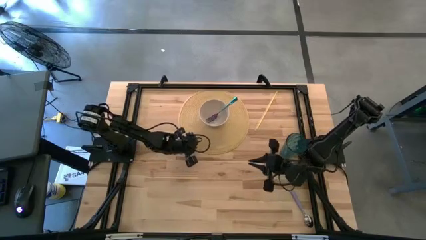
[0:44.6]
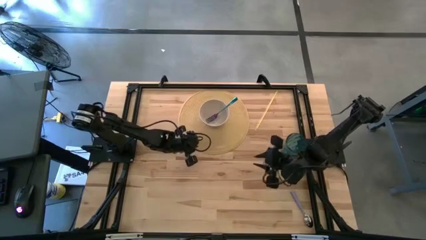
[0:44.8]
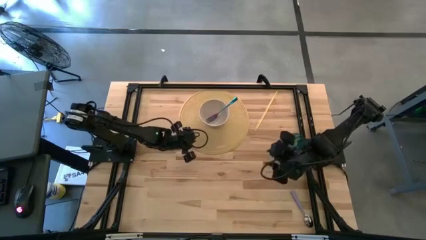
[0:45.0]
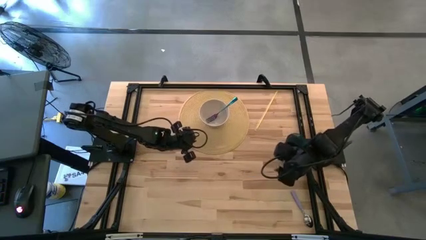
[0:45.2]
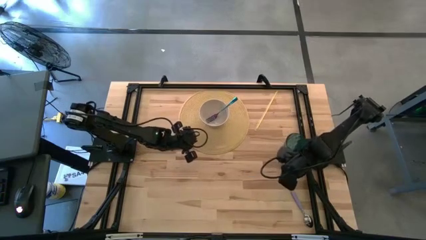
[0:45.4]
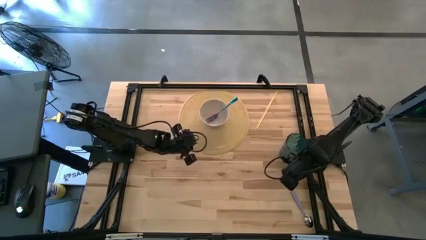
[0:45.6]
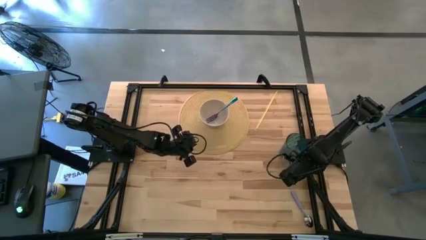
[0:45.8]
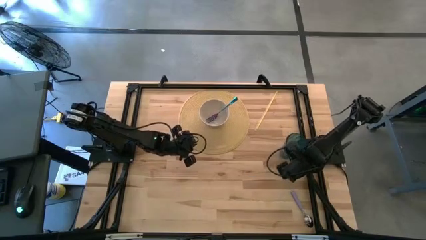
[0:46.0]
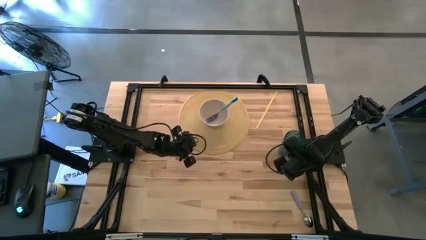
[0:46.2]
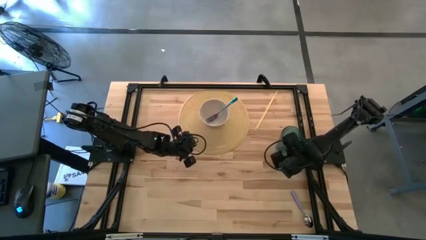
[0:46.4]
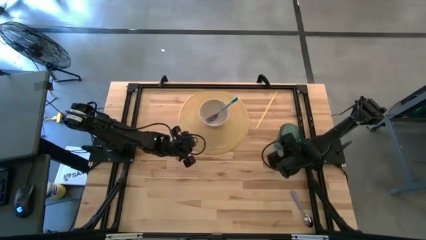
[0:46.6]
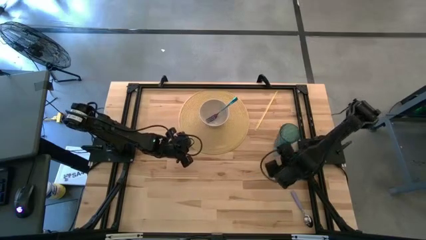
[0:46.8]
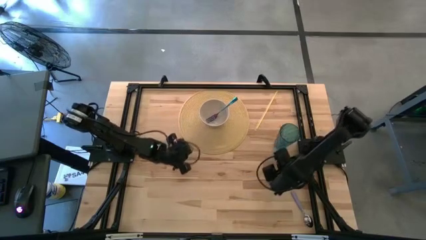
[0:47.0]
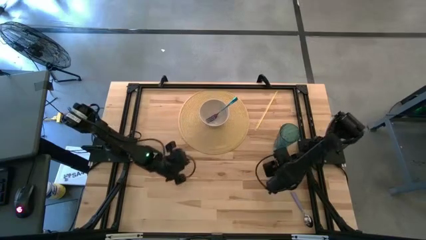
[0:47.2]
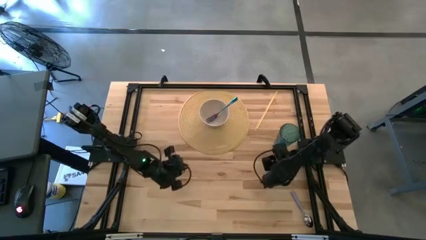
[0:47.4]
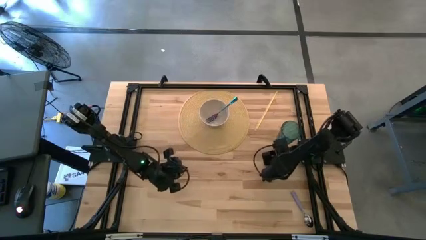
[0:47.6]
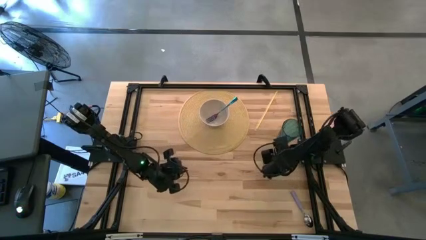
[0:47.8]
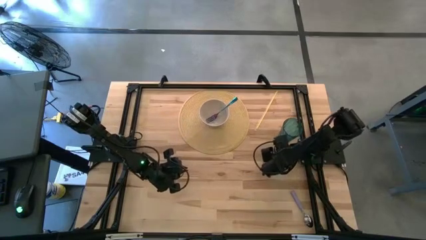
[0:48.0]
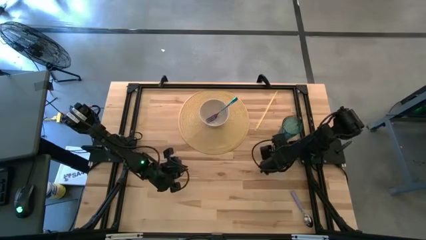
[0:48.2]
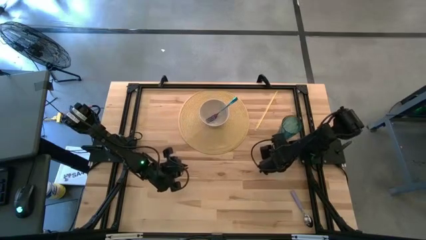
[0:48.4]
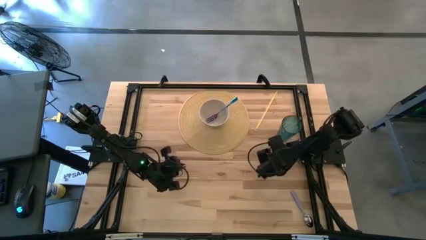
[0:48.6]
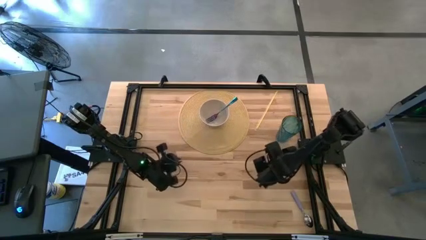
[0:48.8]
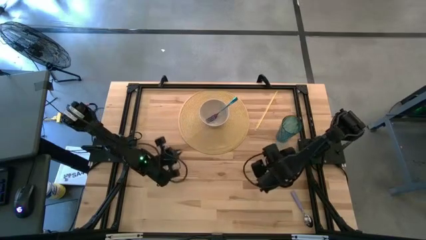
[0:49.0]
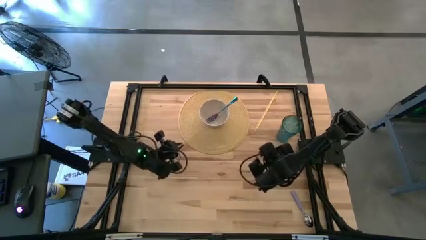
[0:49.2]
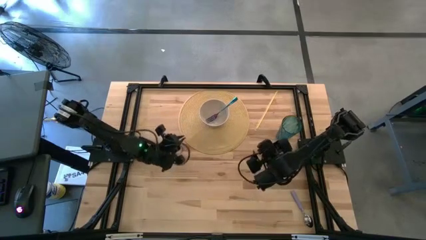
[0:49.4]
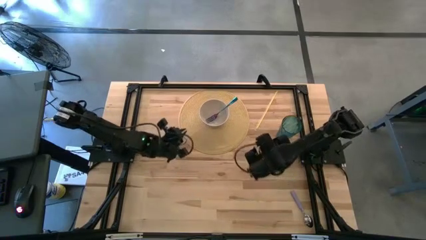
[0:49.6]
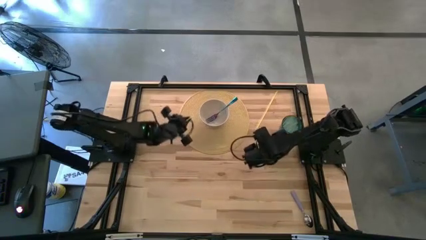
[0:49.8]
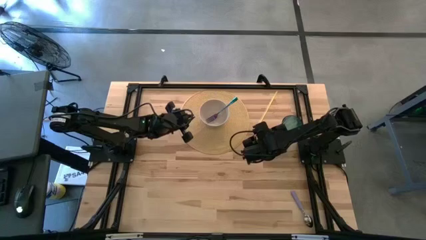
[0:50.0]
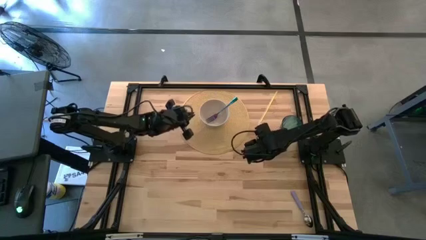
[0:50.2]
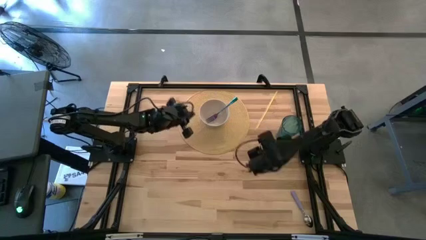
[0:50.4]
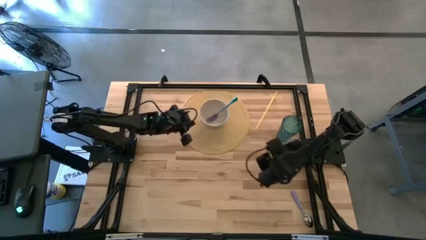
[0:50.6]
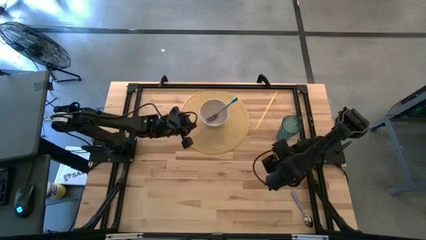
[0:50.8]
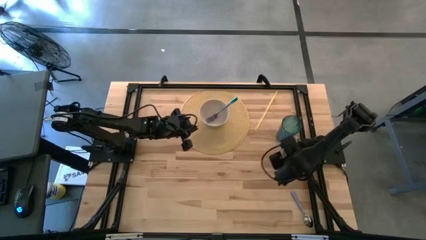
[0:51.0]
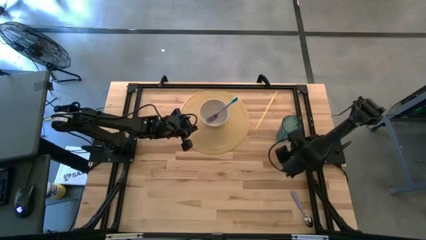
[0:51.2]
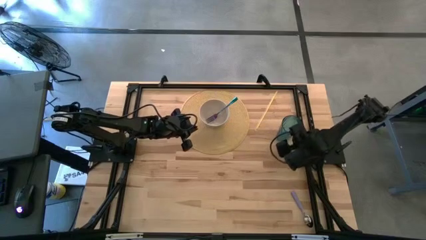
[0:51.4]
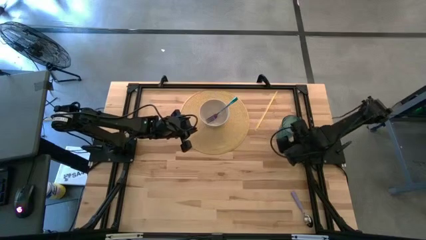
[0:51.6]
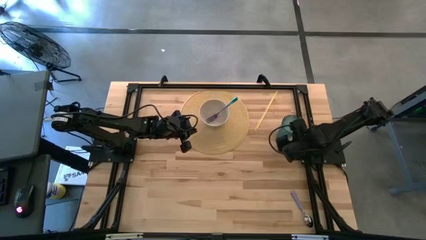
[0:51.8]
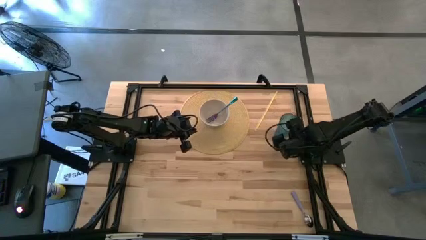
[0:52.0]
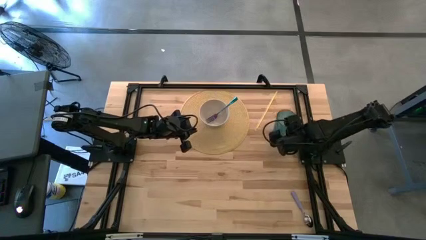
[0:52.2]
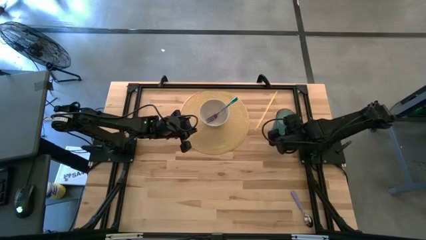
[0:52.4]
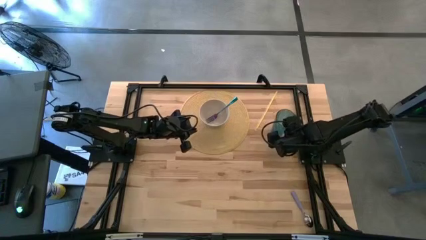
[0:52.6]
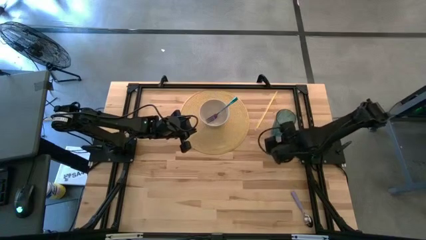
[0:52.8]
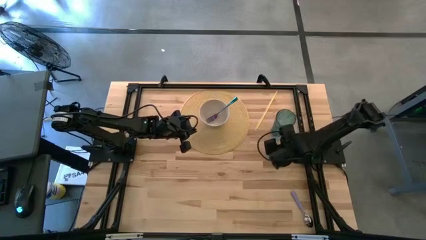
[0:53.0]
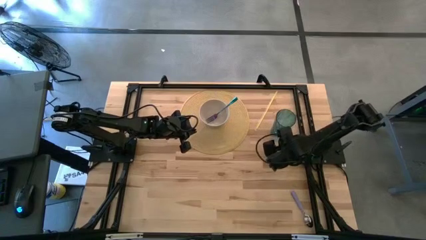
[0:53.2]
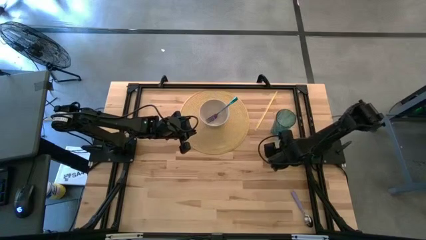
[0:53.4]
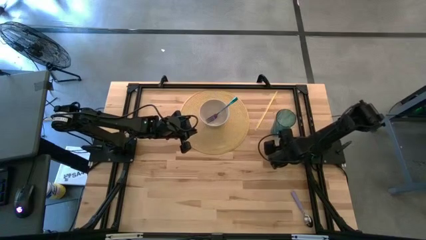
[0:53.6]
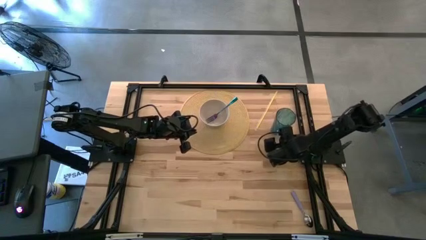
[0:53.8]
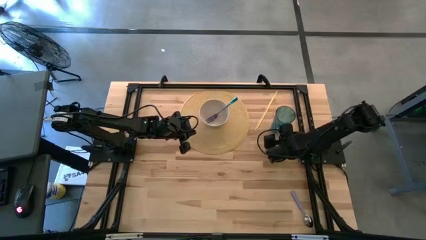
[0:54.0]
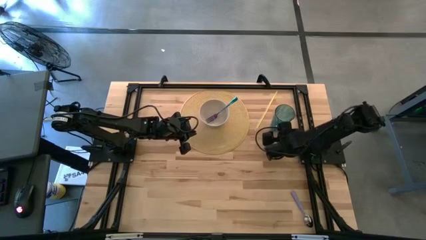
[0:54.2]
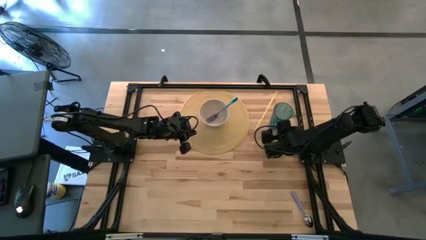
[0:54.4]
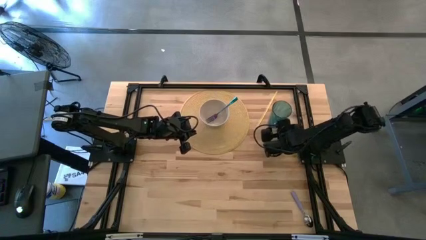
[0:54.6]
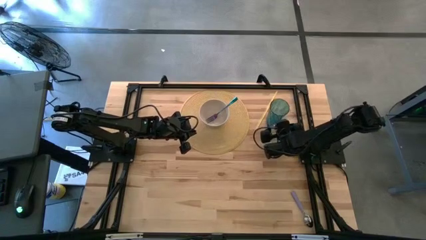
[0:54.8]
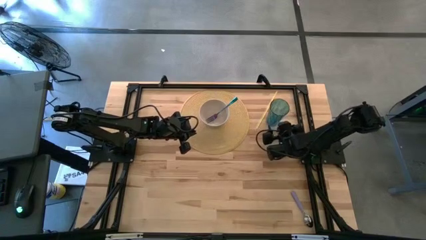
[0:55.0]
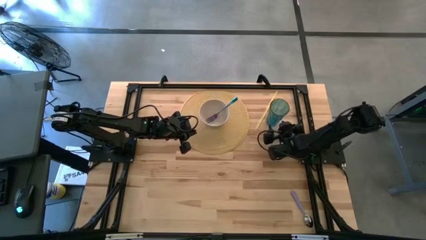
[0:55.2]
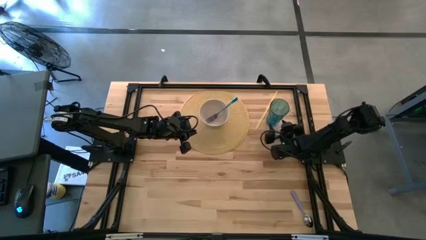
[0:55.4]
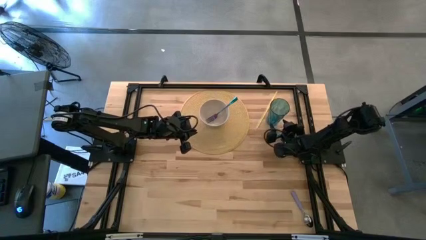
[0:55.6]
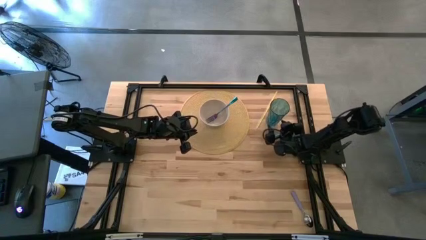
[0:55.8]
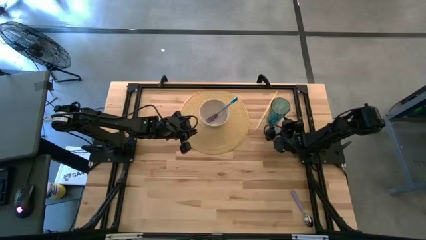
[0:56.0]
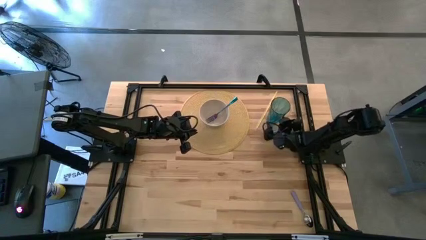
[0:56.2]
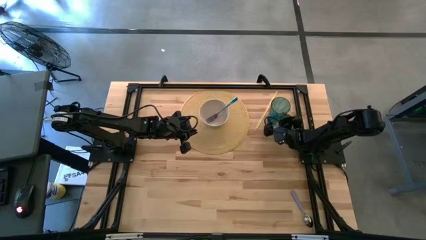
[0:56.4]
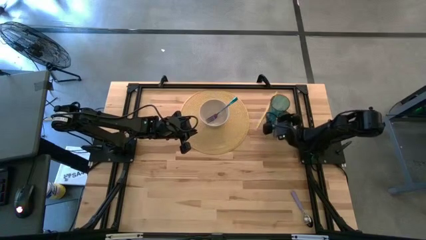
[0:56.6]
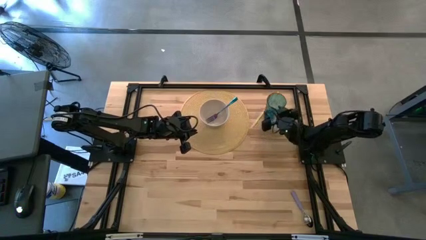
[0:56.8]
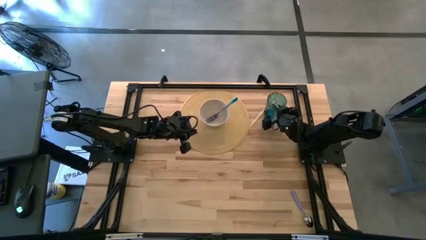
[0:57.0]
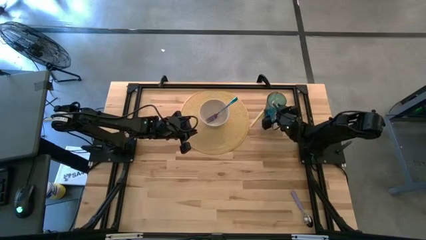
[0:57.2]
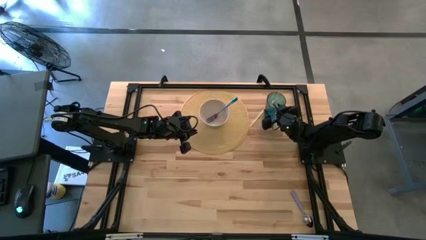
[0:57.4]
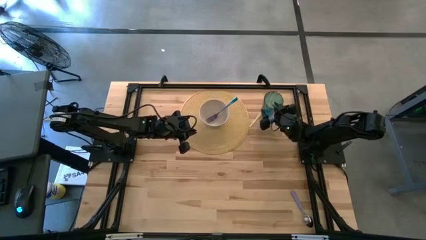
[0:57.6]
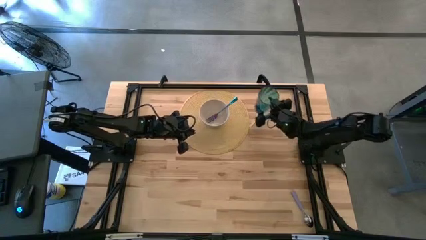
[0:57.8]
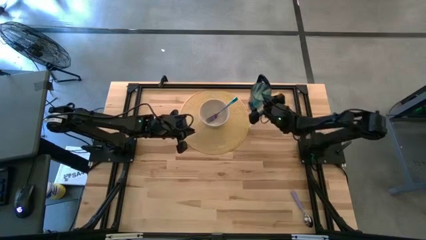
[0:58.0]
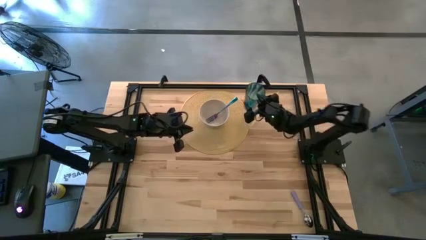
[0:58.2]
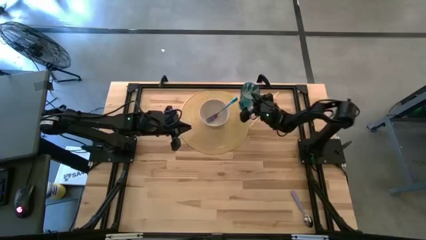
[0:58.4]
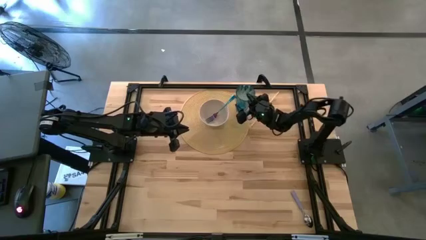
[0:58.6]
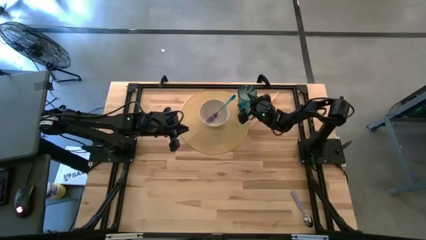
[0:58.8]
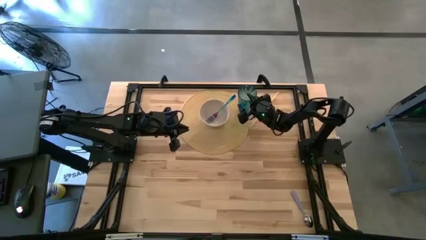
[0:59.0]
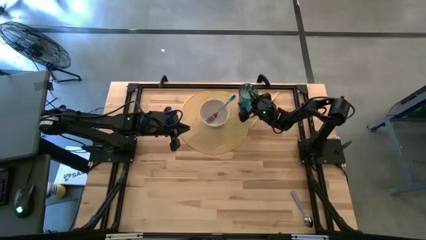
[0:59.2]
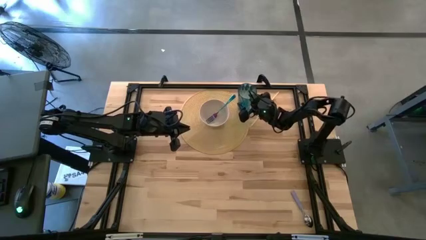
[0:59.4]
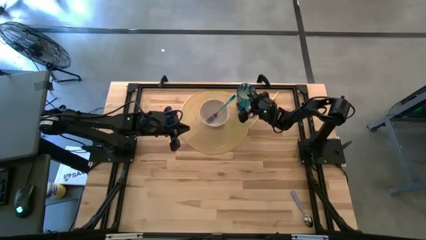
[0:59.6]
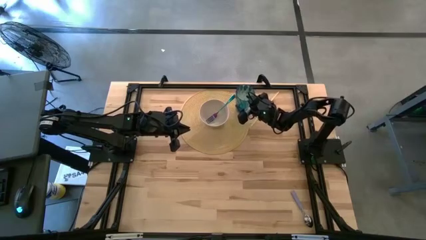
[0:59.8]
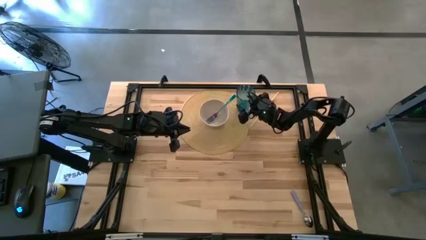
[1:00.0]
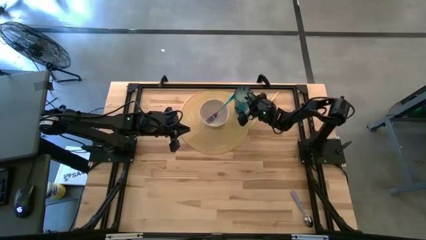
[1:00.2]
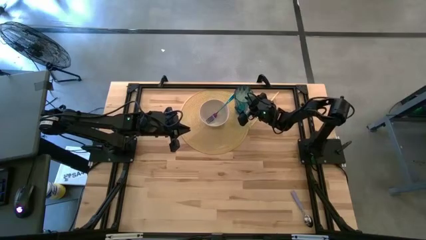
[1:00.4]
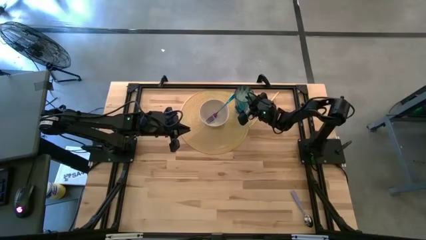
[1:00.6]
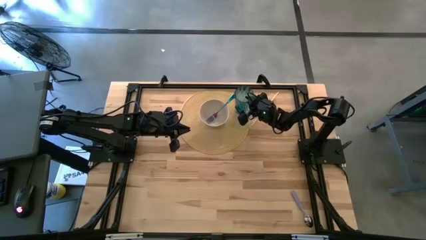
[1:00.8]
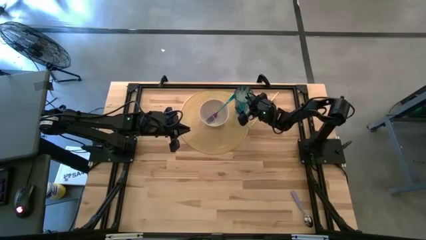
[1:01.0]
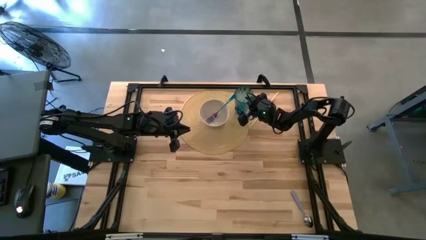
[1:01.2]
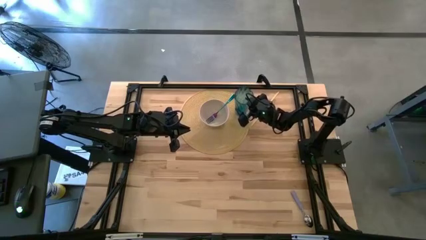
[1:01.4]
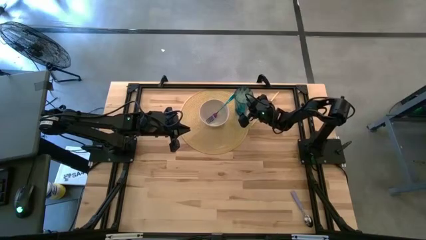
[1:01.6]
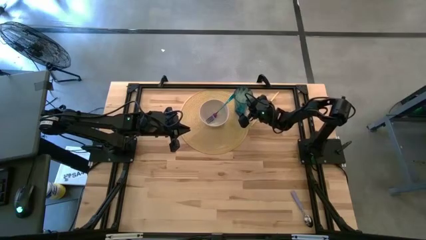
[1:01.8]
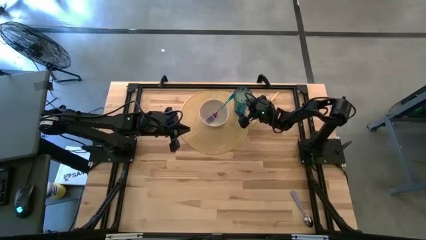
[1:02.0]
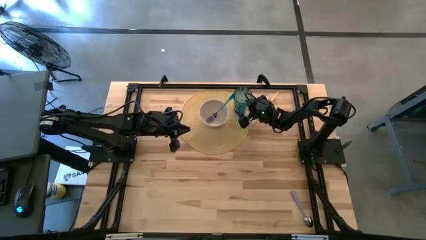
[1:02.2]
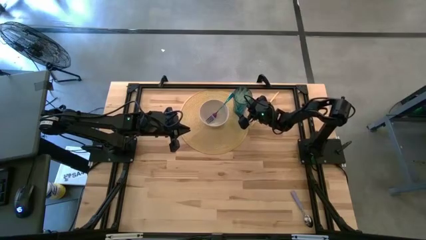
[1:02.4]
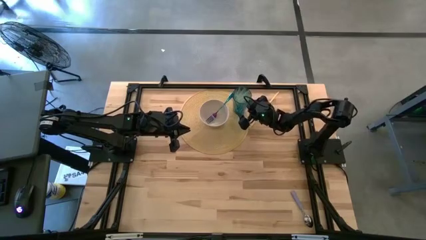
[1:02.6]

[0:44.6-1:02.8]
Task: Pick & Place Utensil
Put the blue cup on the brown mat to the right of the white bowl
